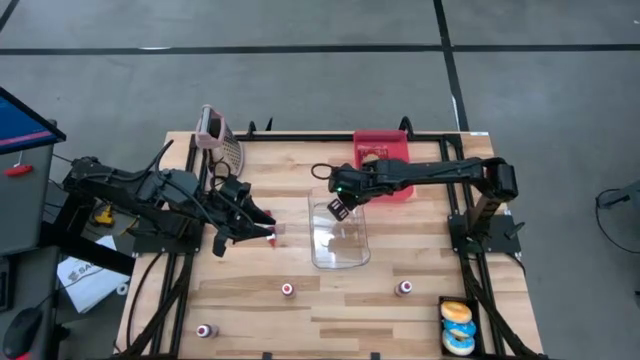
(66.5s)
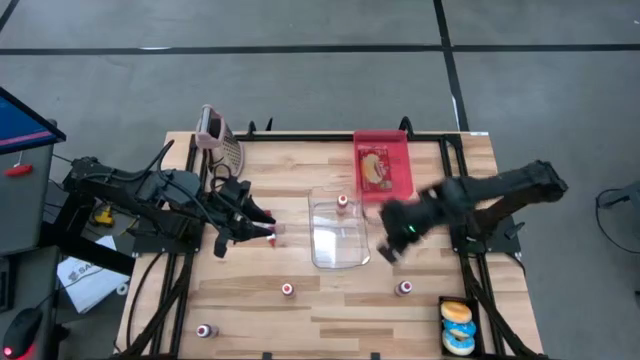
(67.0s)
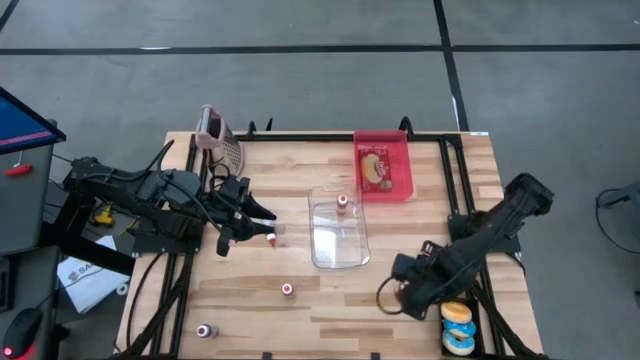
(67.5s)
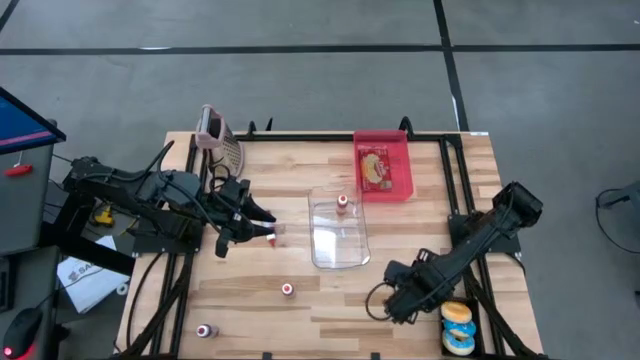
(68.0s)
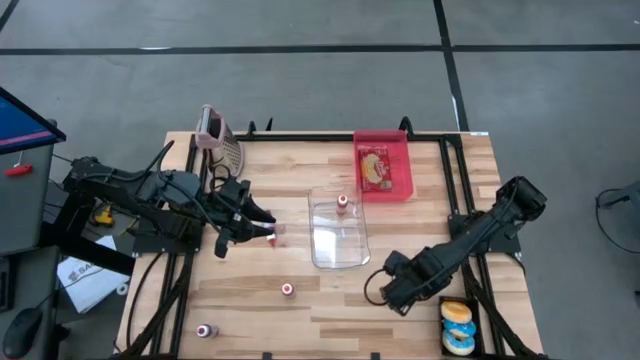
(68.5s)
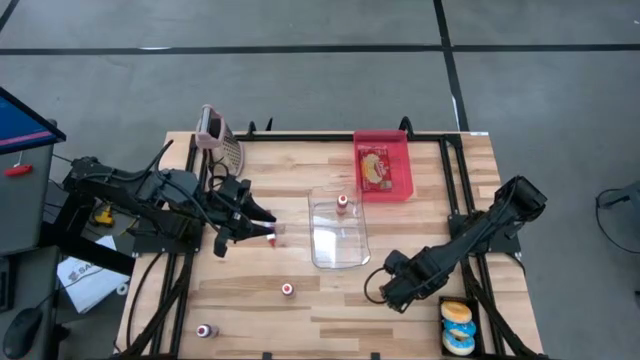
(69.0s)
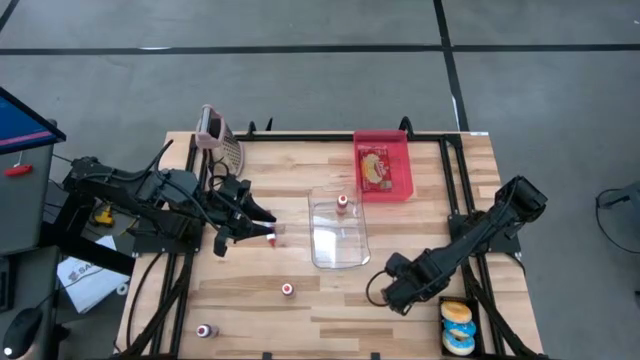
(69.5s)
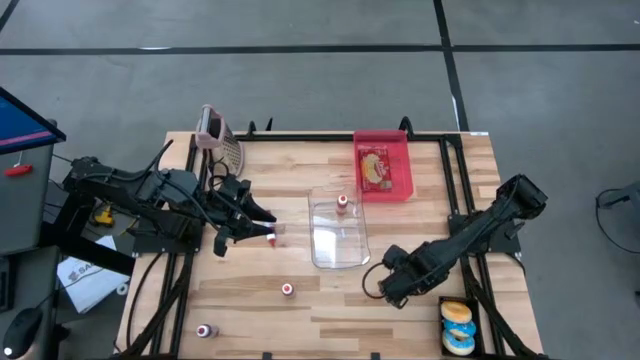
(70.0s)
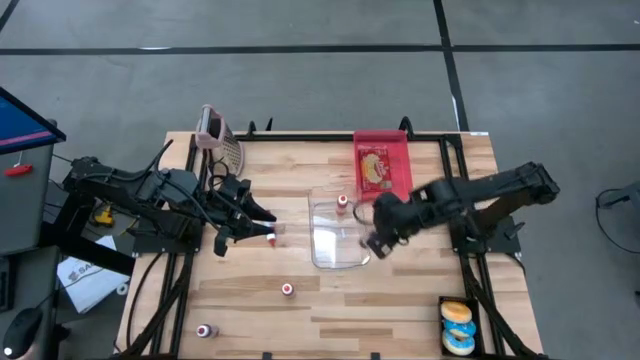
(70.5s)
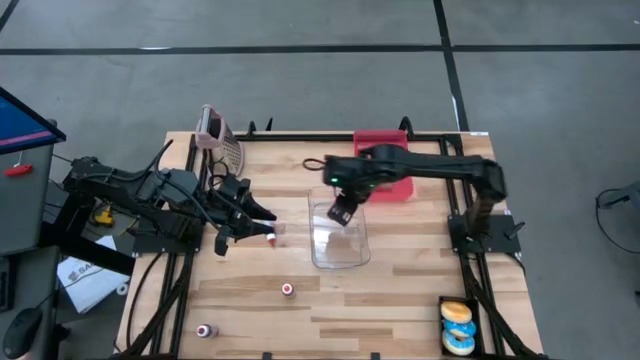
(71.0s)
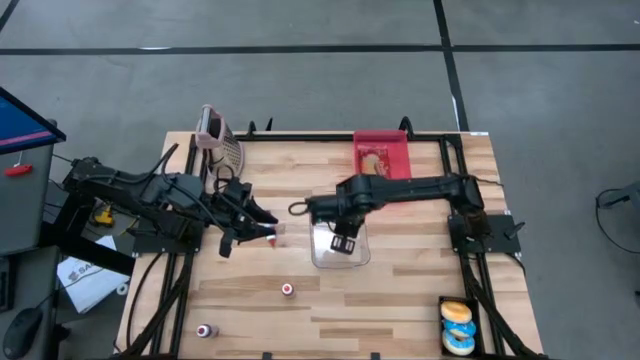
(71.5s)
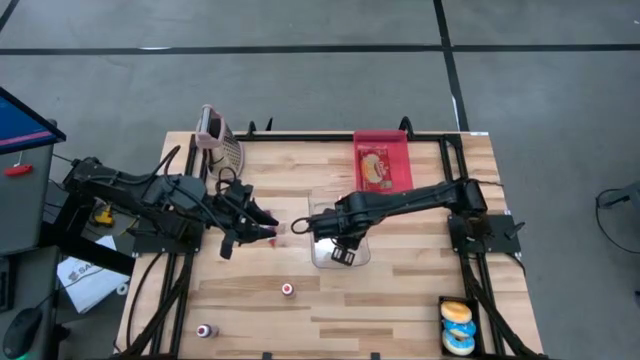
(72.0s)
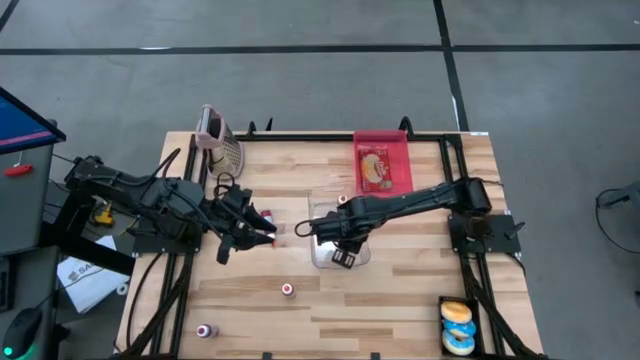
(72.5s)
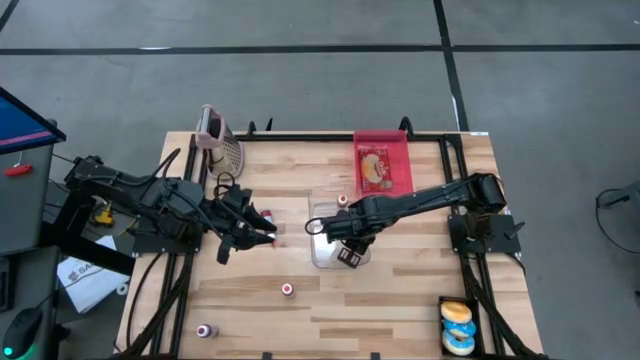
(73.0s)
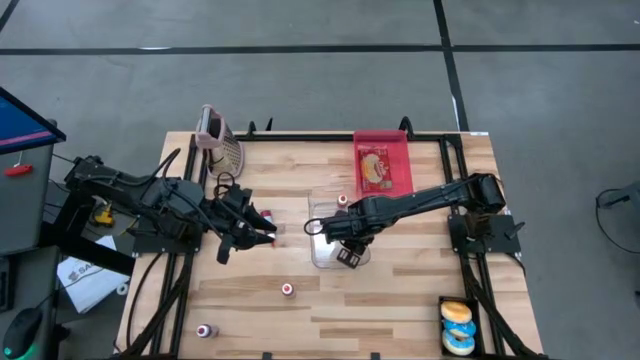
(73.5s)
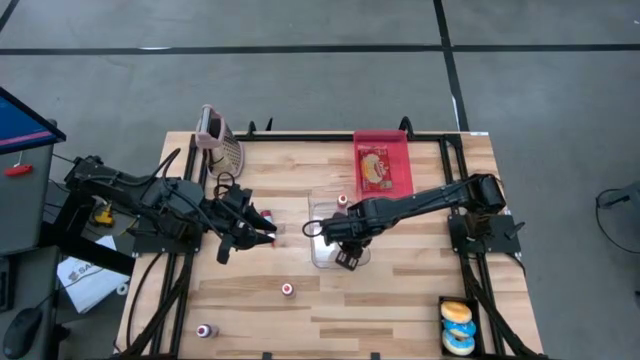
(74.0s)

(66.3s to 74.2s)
Put the right red food coloring bottle into the transparent bin

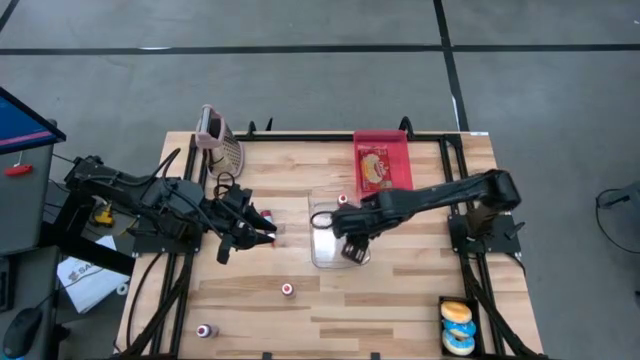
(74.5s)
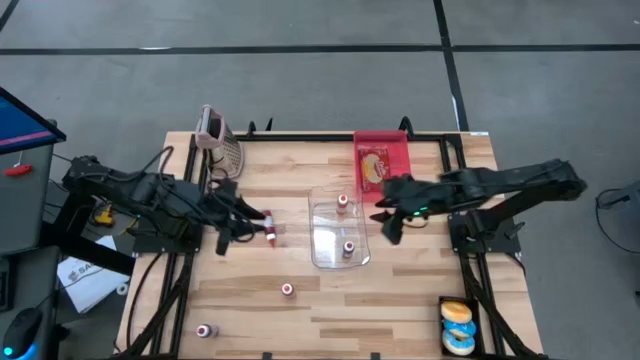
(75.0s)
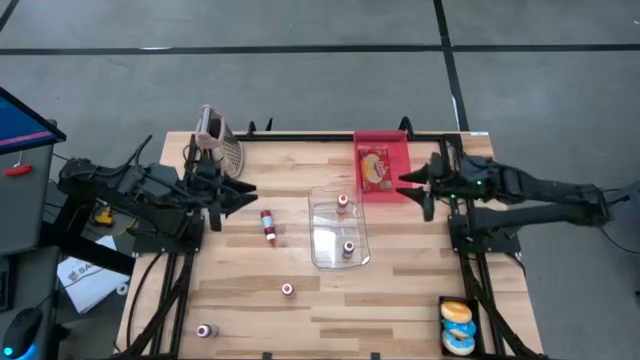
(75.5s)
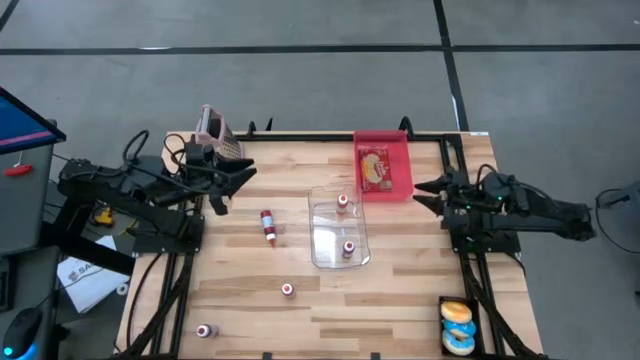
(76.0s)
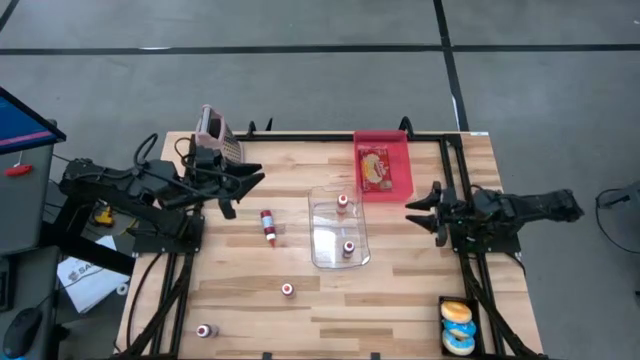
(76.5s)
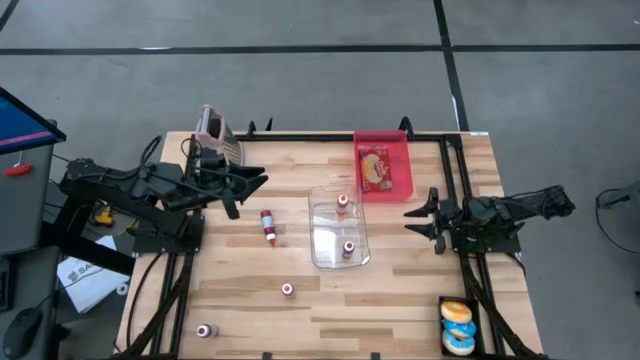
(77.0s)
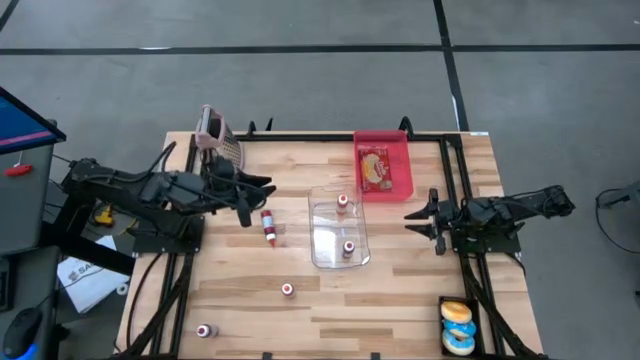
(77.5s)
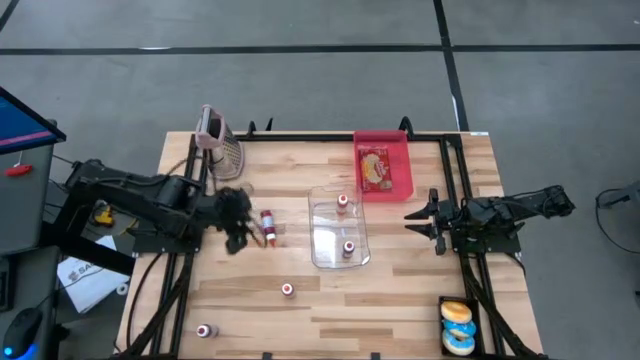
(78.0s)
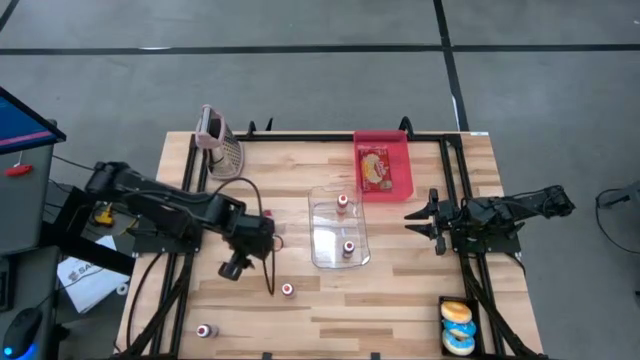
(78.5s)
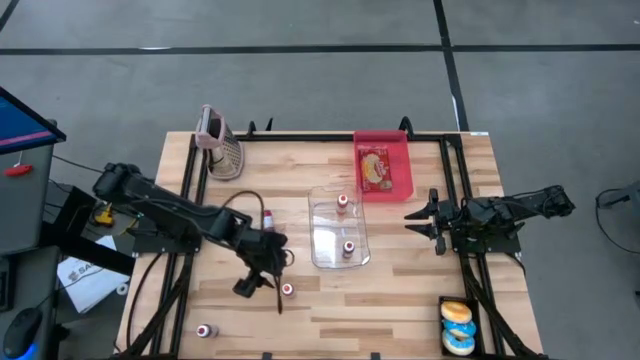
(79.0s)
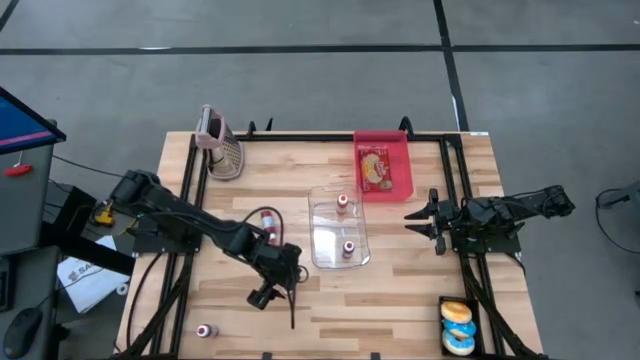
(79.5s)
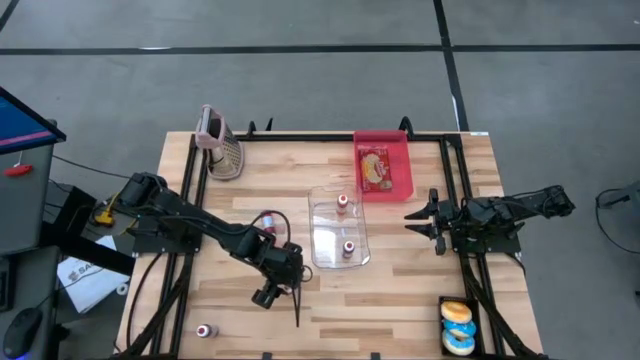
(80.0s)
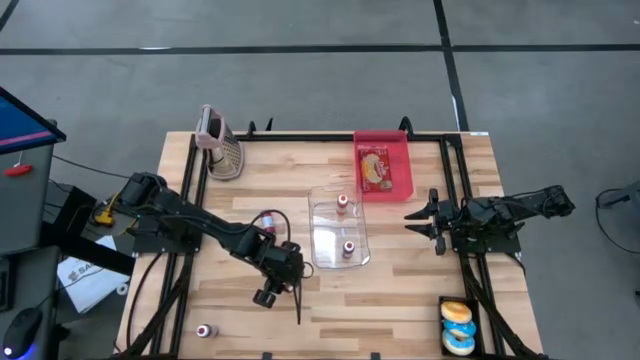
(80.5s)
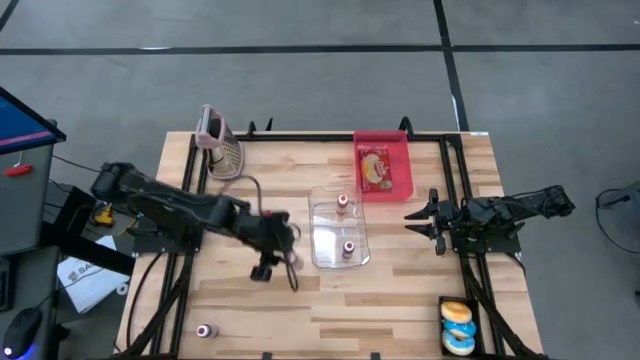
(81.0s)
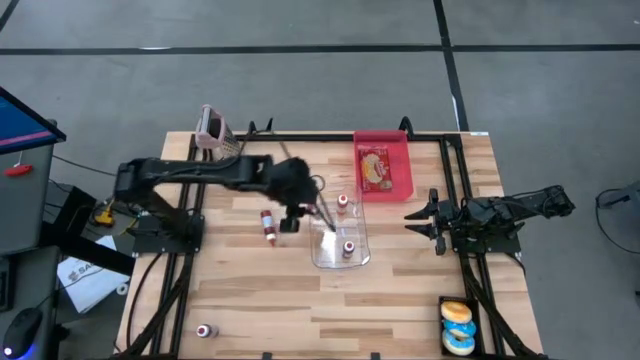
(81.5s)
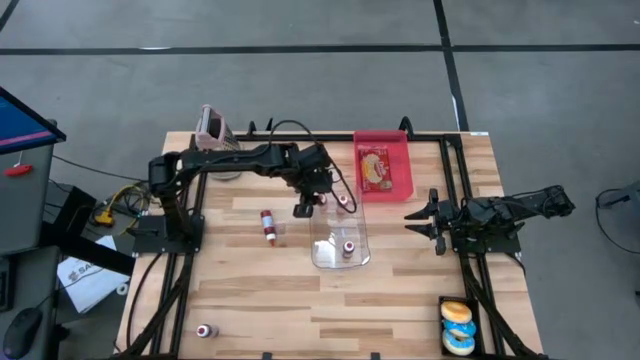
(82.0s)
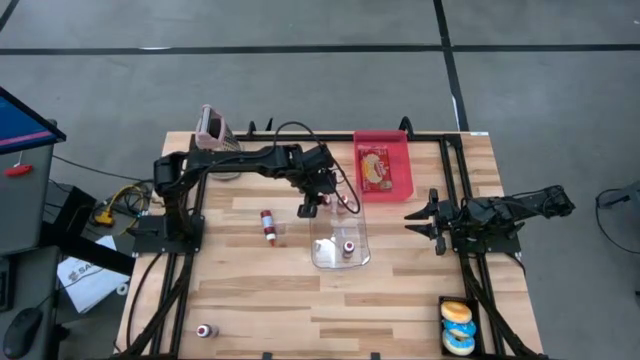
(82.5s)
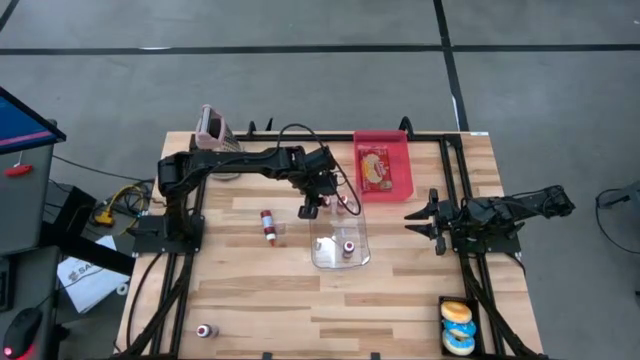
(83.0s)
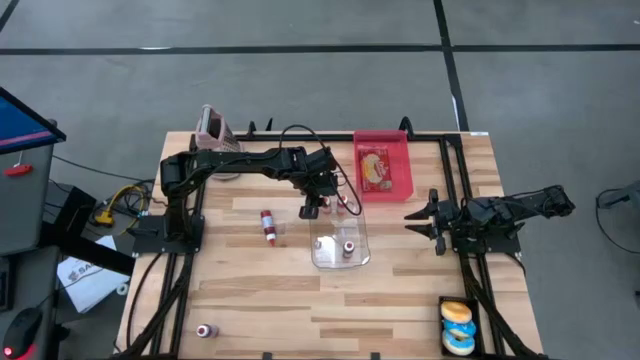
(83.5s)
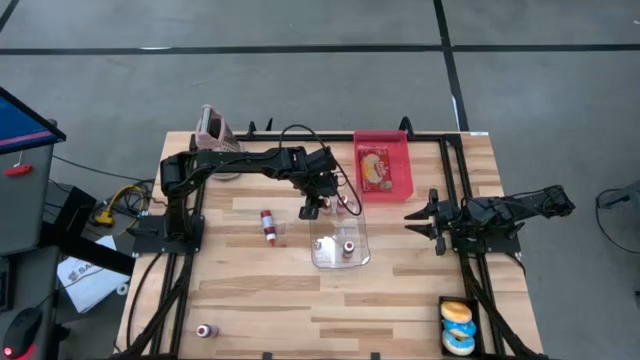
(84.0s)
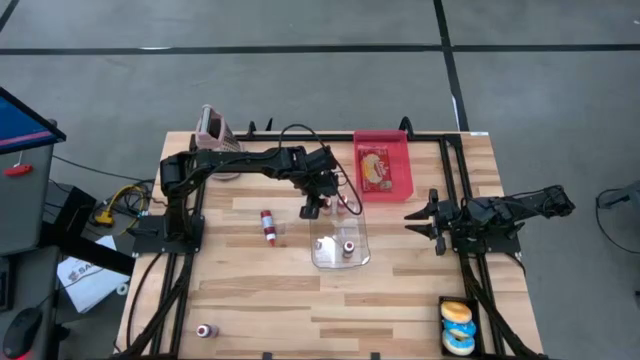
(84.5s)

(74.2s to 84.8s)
Put the orange food coloring bottle into the transparent bin
